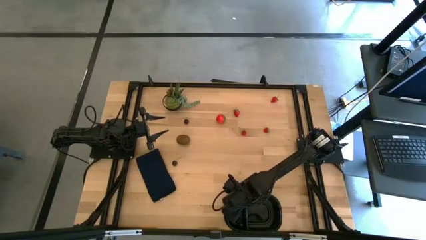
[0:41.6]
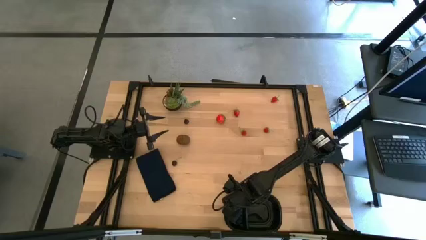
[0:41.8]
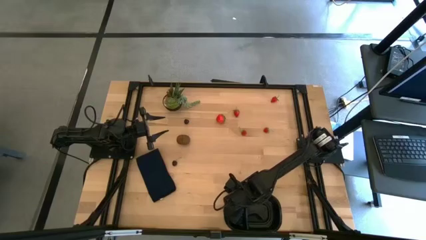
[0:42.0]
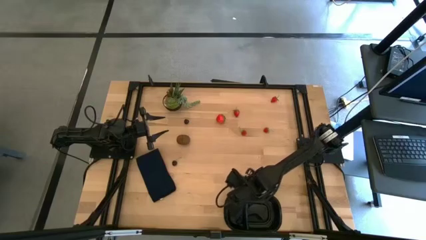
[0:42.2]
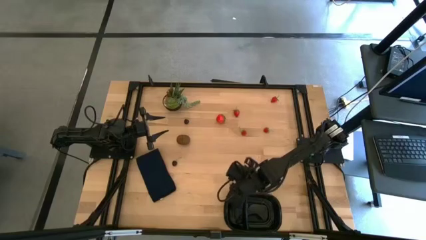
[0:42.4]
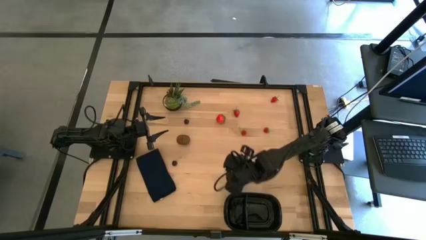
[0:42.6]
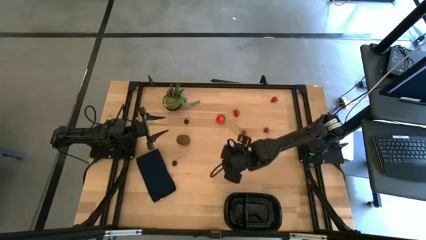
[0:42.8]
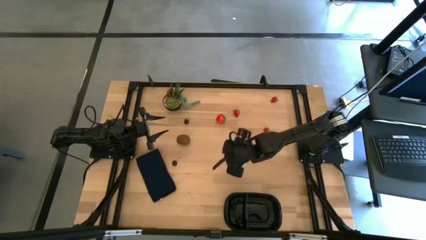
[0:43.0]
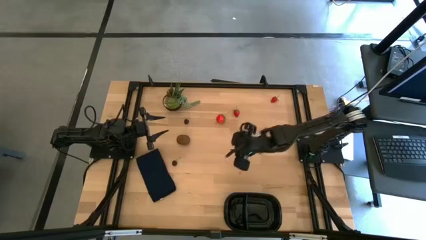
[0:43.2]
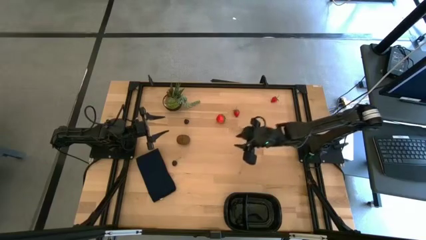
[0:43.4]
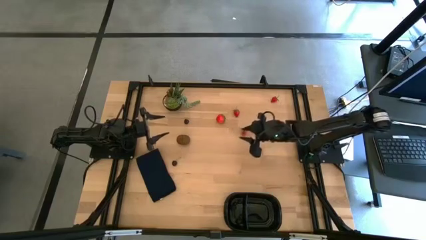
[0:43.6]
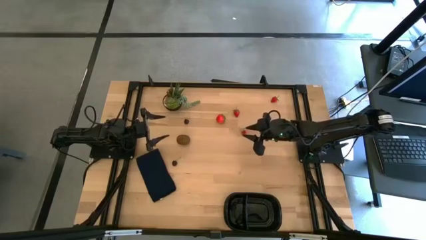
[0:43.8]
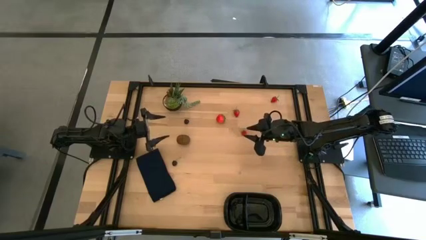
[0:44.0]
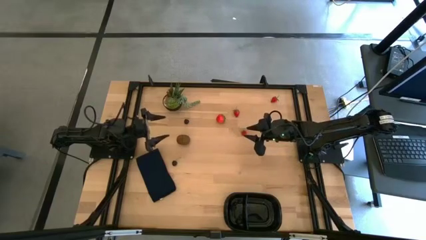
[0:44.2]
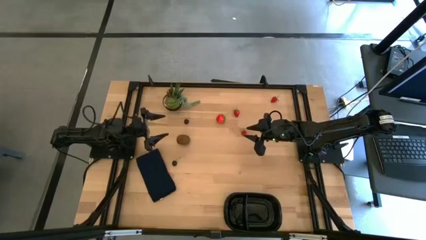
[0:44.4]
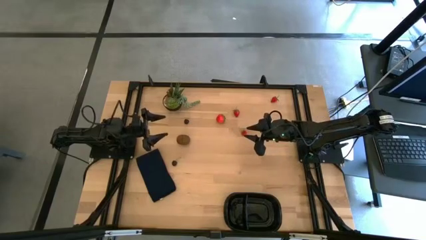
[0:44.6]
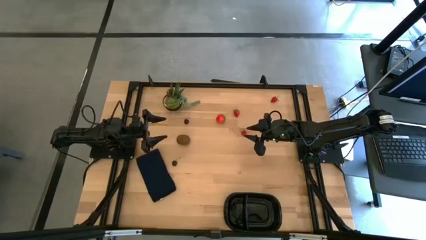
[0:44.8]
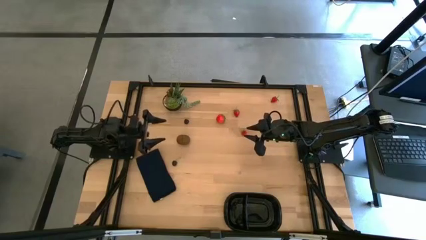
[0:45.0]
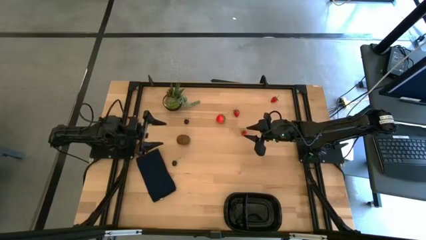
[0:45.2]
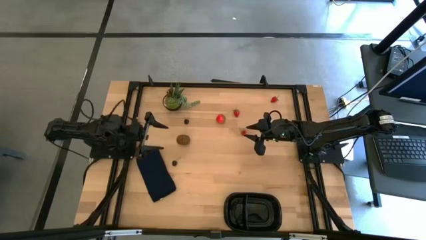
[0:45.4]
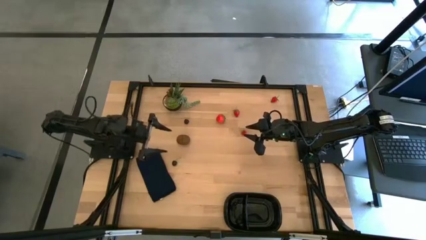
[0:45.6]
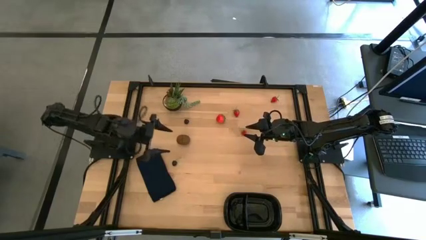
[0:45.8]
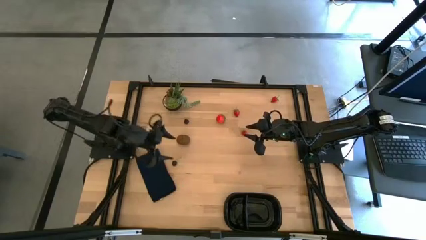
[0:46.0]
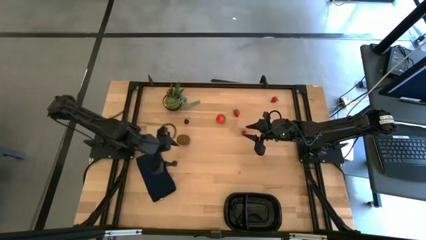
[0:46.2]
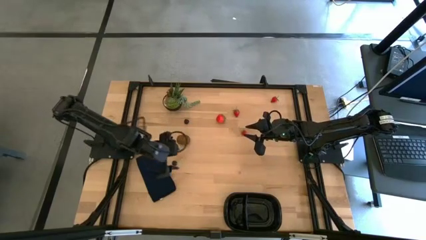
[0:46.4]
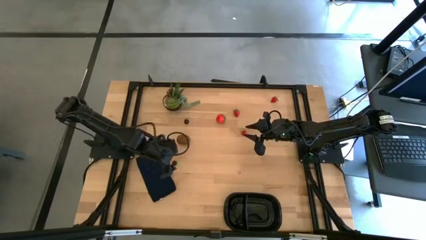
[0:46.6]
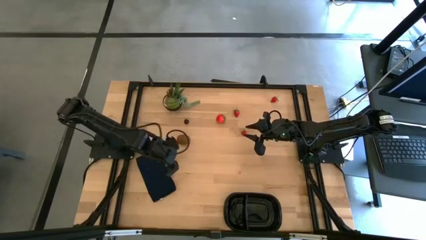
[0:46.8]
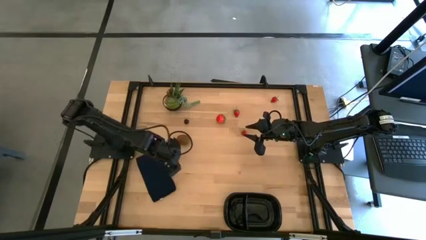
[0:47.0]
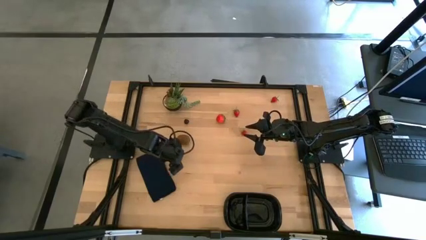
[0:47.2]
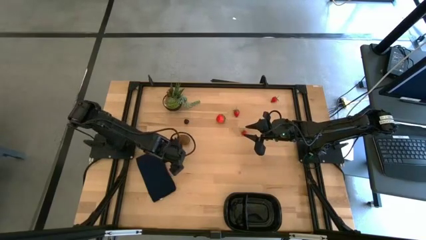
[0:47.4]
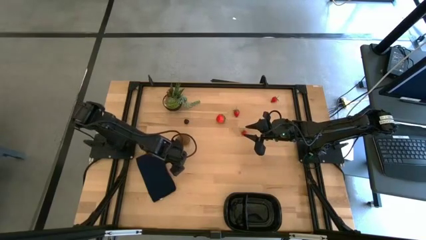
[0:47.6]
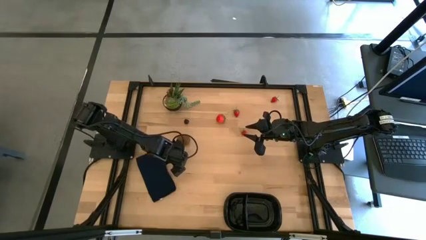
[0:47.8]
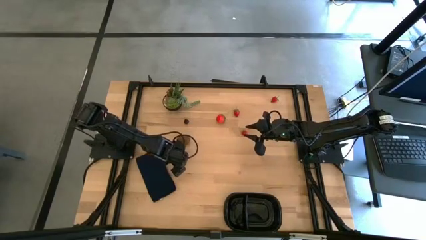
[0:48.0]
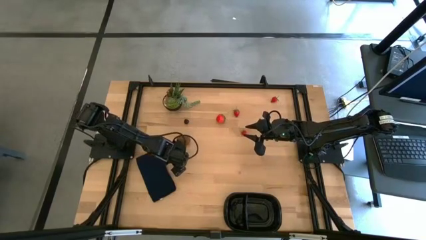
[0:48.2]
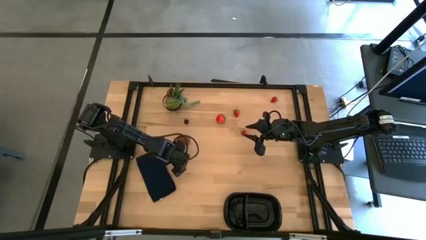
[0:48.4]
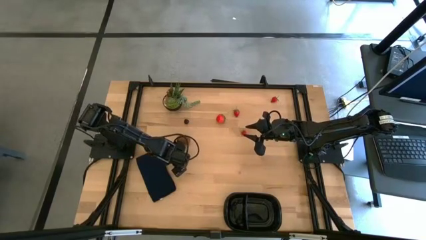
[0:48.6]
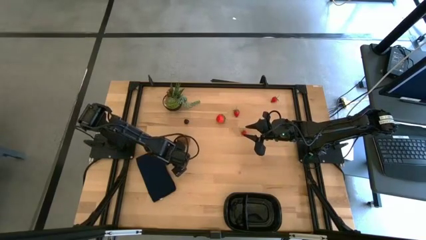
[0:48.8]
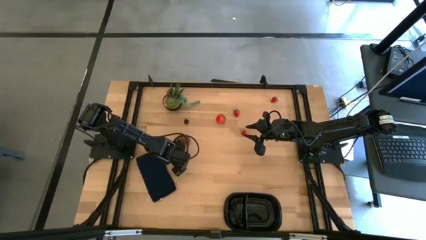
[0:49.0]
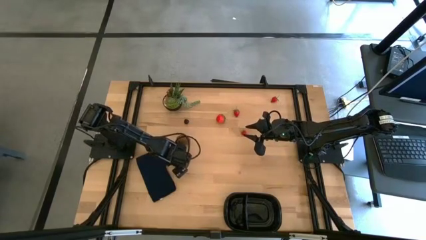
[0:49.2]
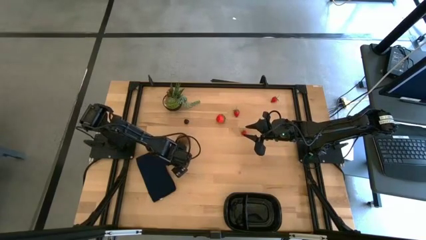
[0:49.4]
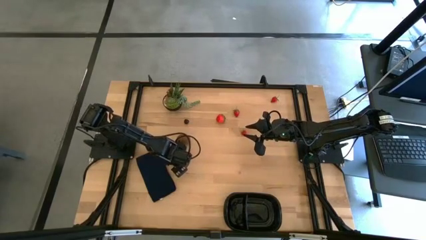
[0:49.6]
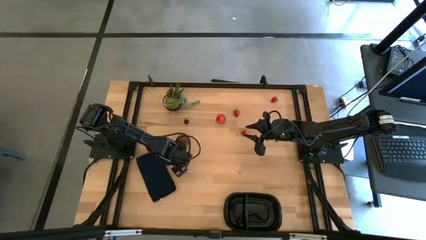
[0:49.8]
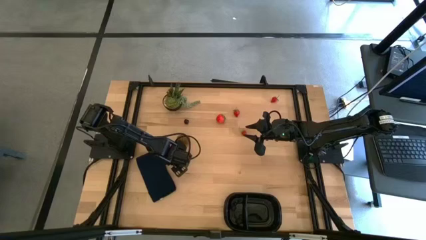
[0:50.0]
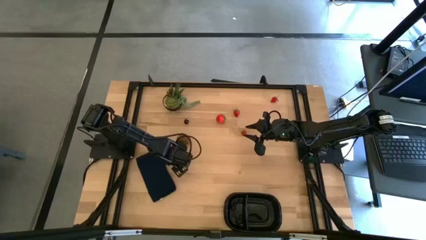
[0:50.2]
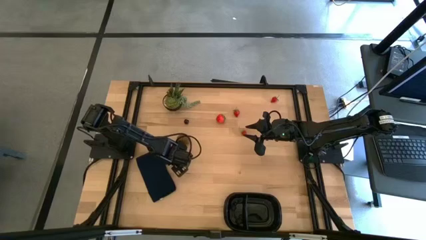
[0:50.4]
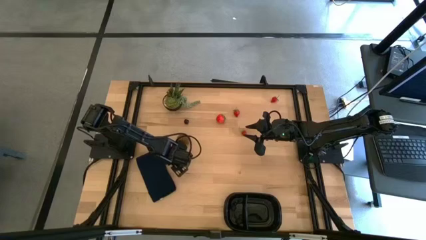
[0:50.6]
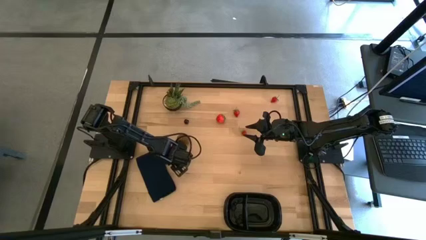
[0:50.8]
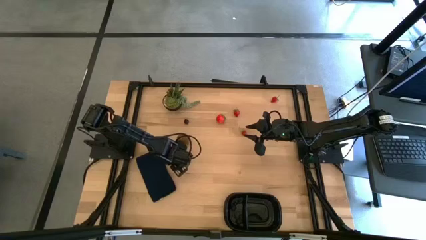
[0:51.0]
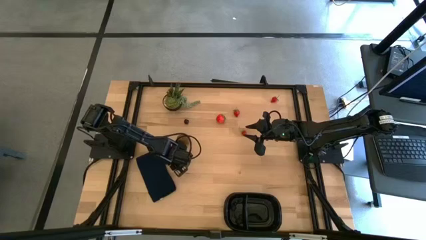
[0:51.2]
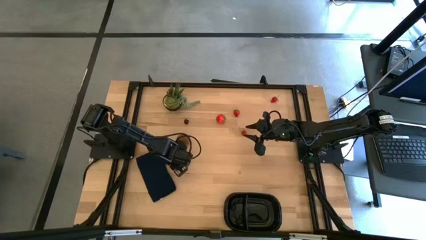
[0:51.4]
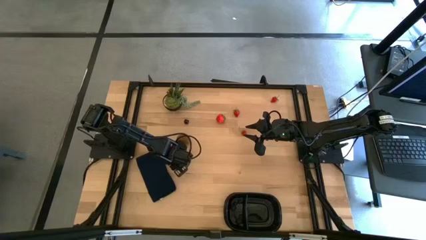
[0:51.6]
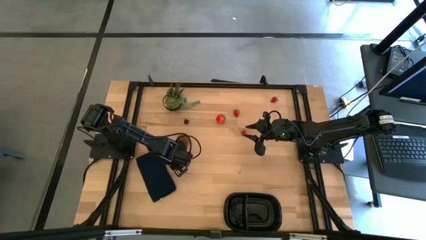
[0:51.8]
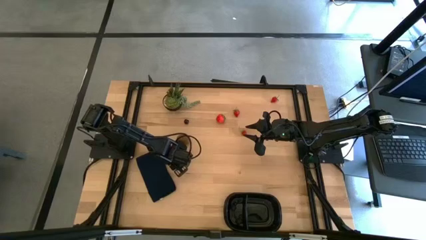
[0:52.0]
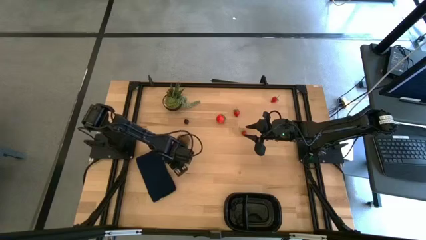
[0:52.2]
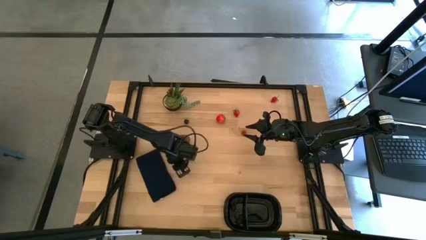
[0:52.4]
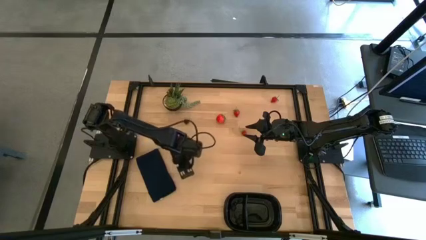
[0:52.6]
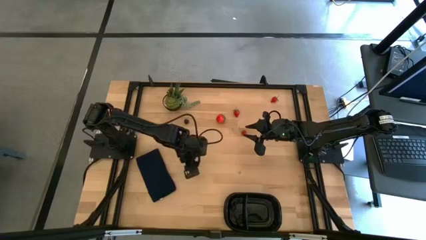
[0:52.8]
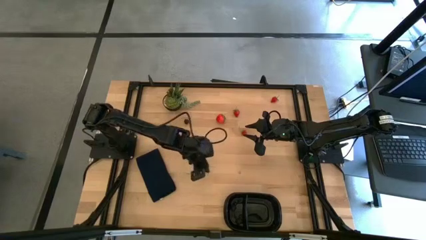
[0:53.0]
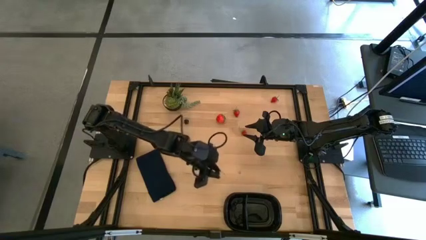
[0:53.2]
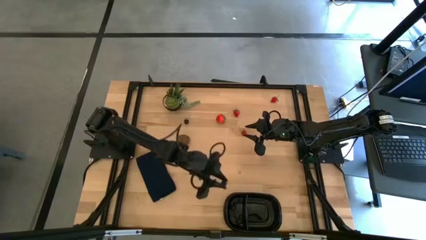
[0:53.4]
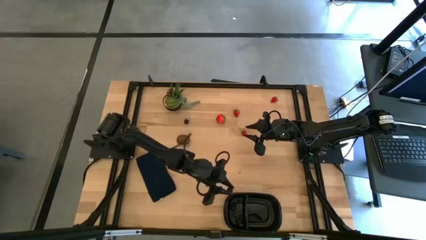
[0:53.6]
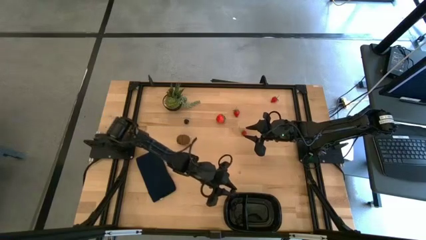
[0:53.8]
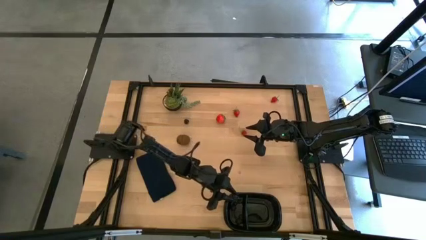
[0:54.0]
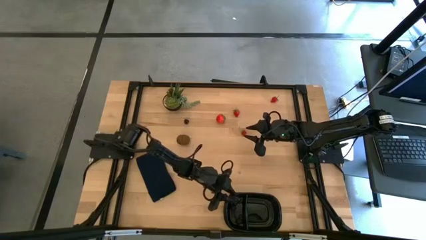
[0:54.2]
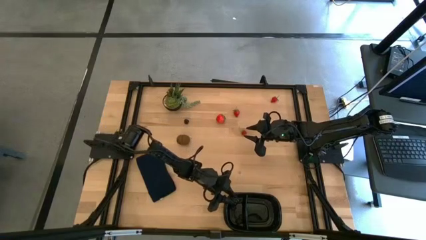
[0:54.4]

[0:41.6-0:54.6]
Task: Pick and placing Produce into tupperware
Put the black cherry into the black container
